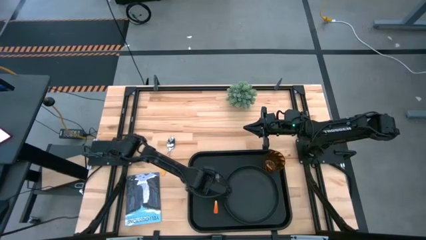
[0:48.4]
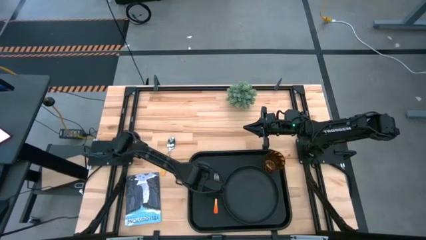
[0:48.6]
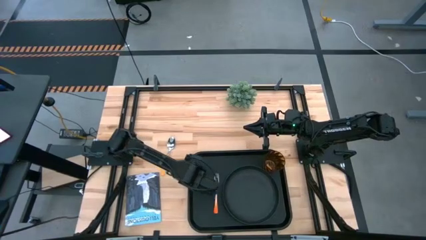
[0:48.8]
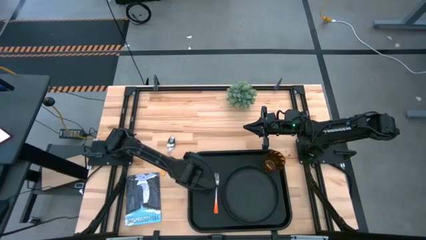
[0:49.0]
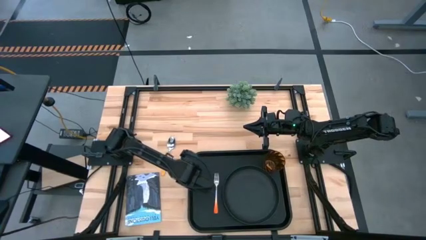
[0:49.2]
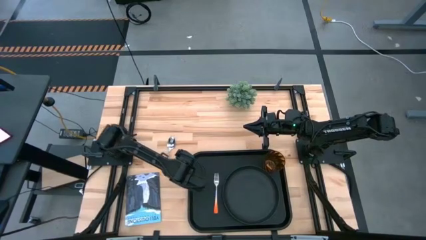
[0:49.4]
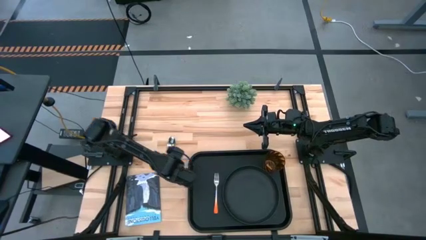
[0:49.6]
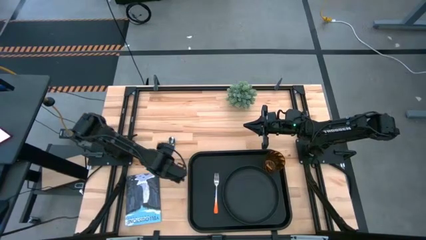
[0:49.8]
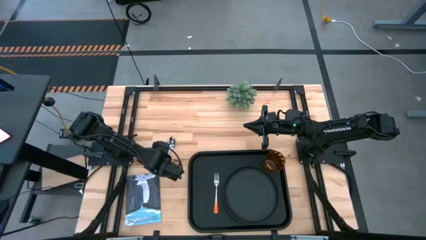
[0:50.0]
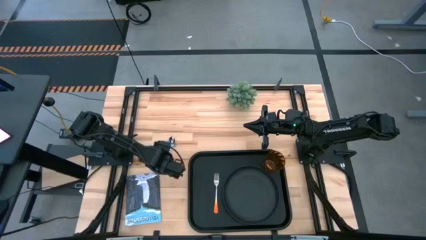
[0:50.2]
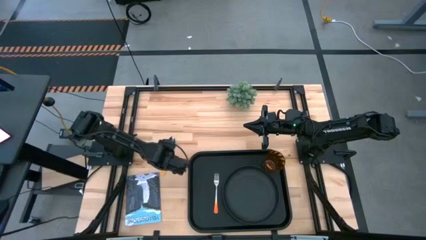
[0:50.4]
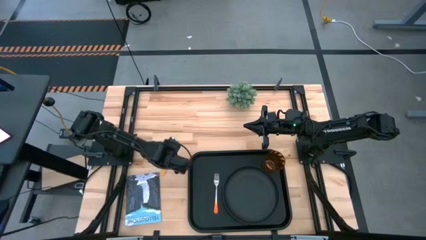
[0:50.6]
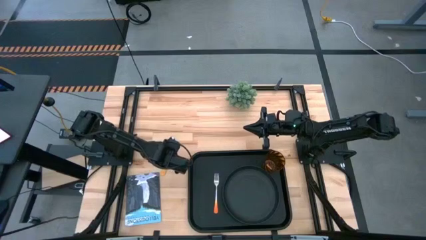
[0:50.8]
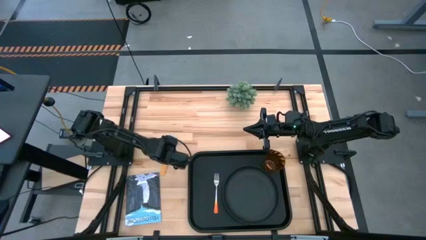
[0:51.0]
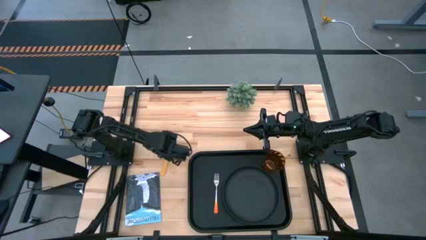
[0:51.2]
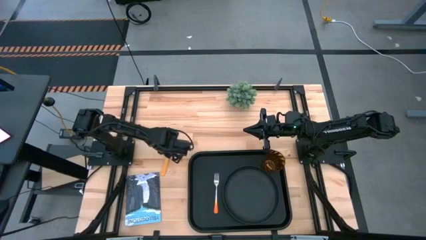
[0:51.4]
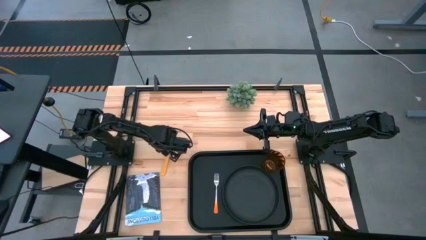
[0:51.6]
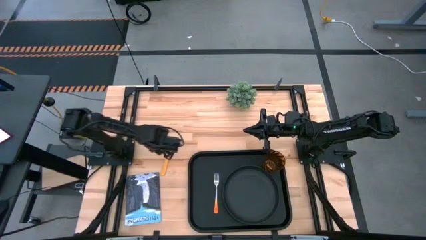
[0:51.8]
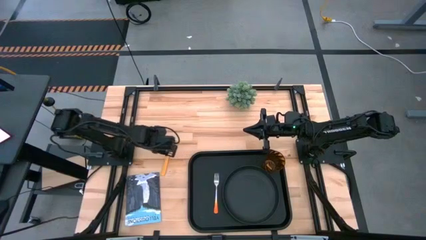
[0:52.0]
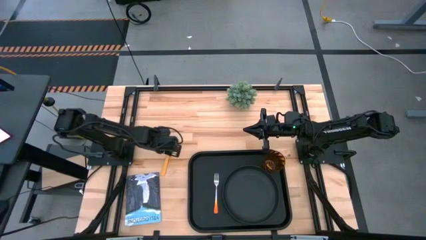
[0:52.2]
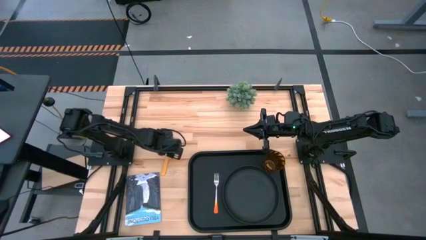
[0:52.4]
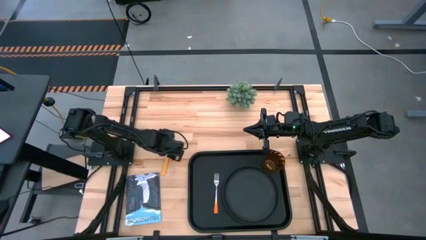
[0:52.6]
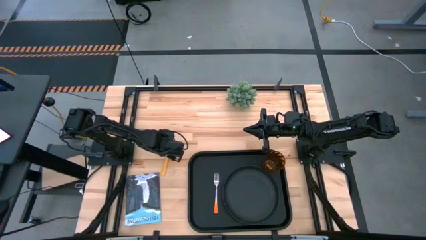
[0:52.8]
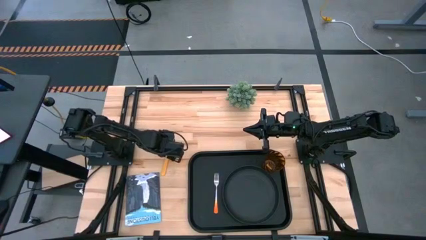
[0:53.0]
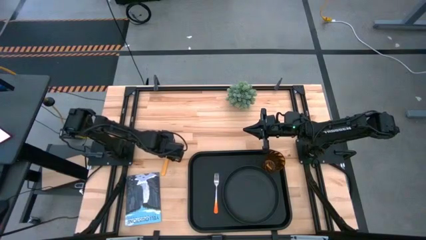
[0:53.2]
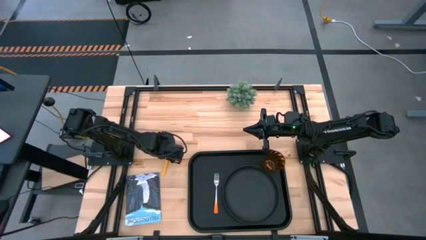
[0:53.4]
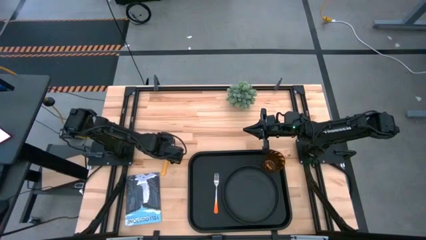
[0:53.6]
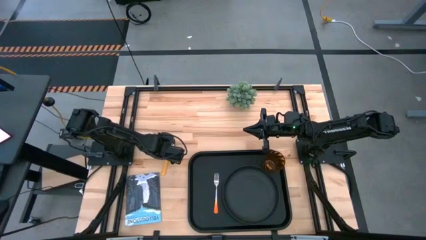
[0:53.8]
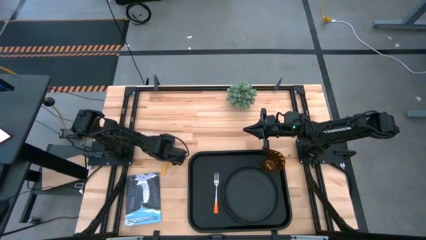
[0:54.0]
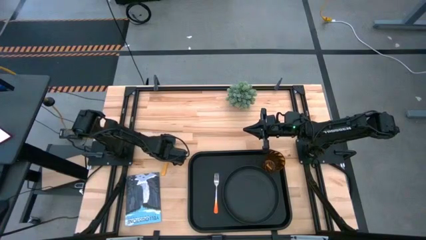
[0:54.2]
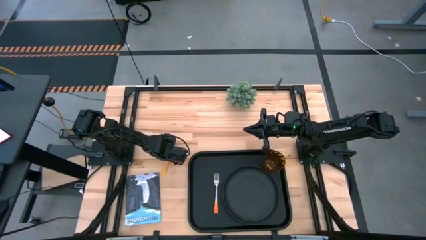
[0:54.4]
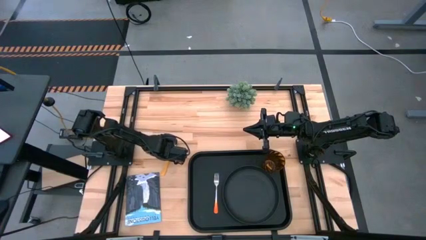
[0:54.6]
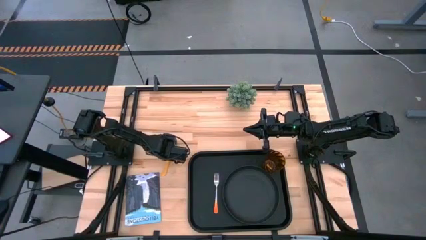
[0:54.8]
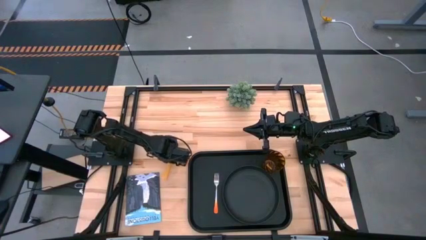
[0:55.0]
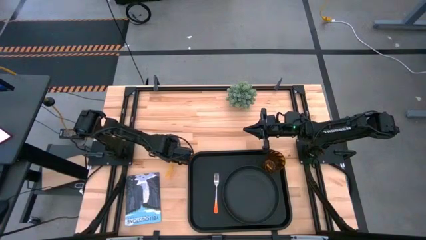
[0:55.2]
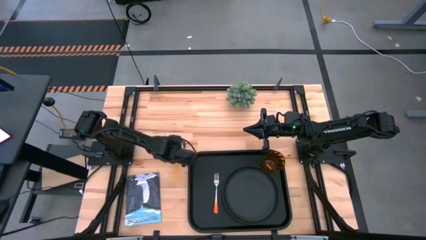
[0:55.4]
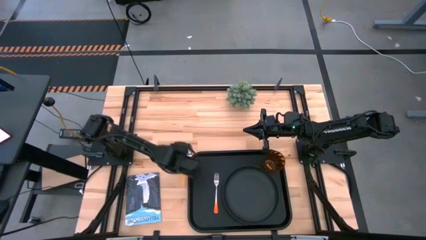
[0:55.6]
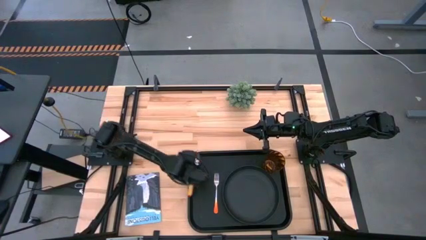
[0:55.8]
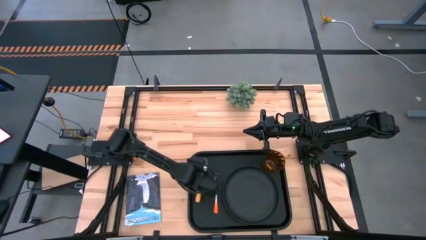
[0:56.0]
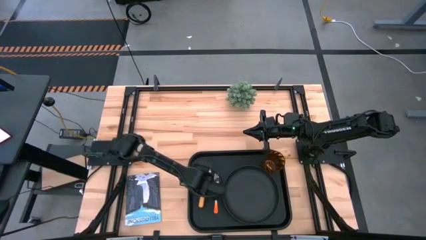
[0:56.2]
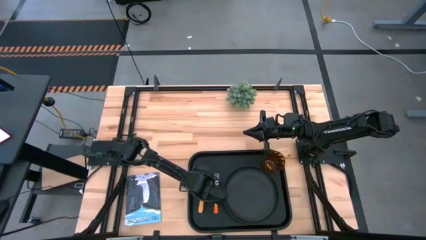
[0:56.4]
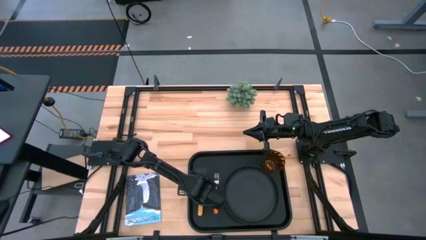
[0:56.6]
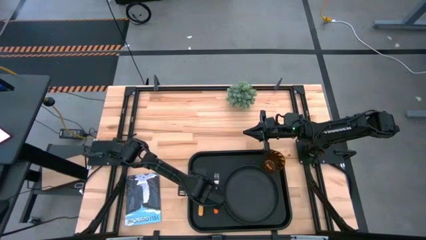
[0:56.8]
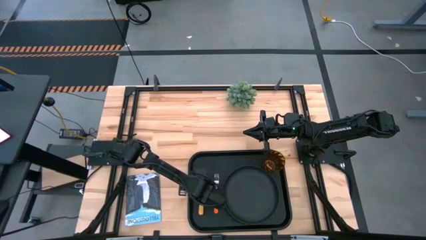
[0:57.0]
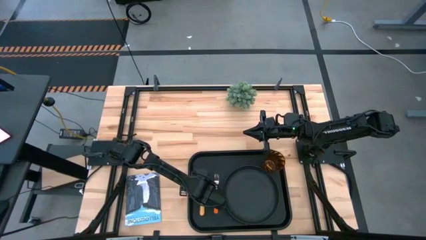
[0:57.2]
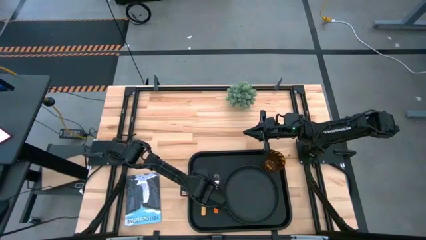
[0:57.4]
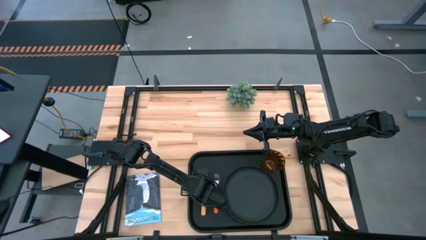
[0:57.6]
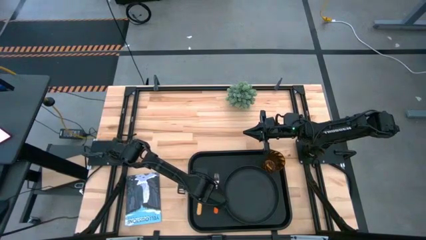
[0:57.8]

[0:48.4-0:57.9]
Task: Pick and place plate/cup/fork/spoon on tray
Put the yellow spoon on the black tray to the left side of the orange spoon

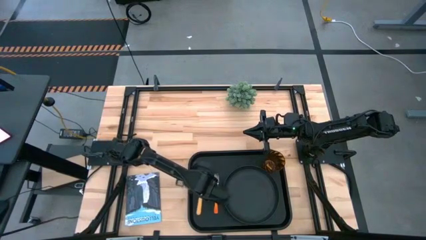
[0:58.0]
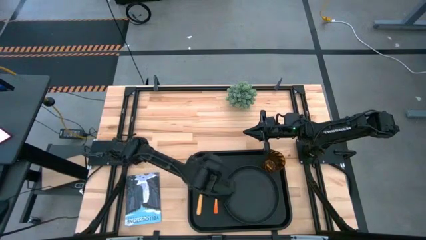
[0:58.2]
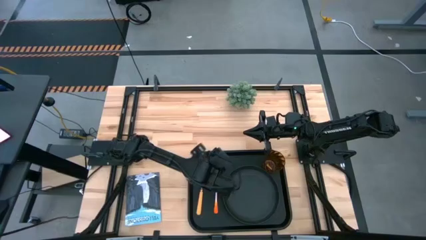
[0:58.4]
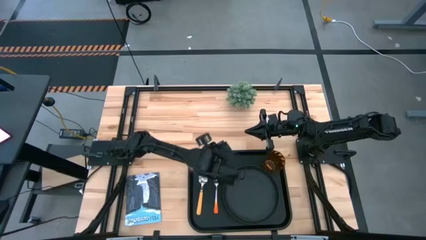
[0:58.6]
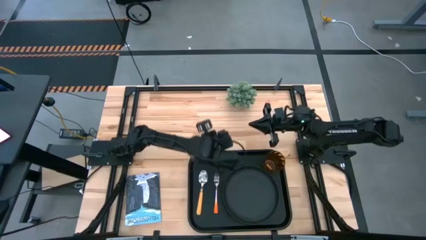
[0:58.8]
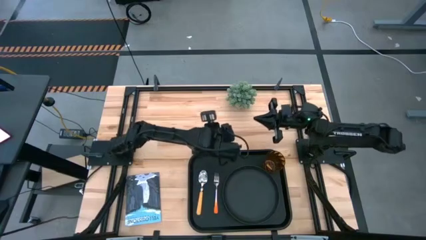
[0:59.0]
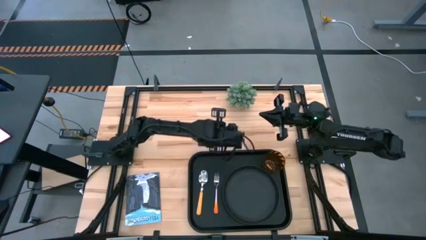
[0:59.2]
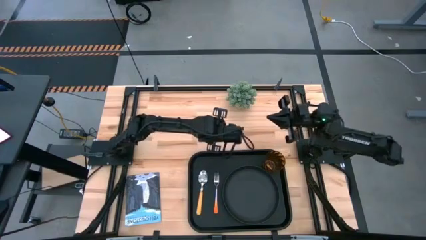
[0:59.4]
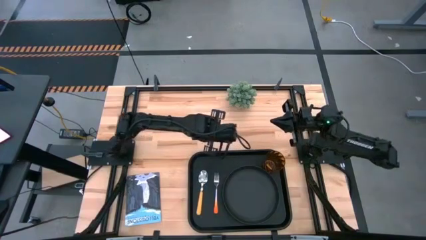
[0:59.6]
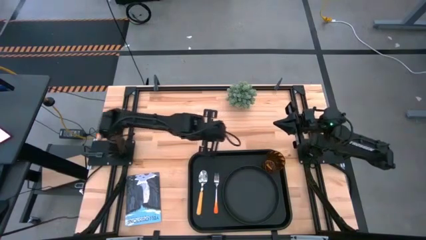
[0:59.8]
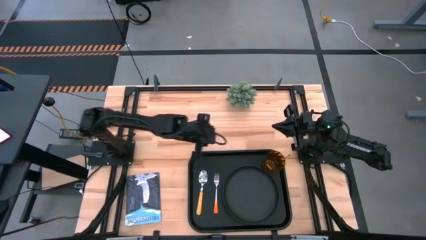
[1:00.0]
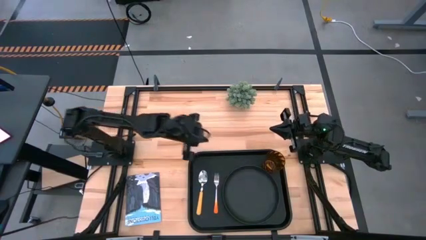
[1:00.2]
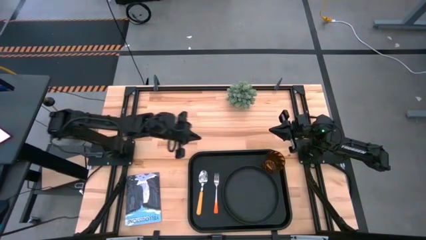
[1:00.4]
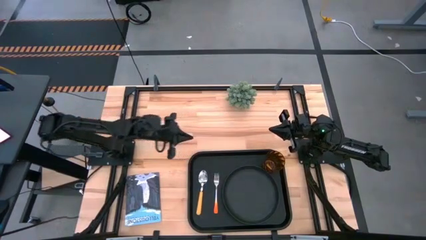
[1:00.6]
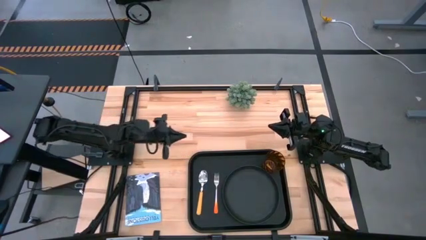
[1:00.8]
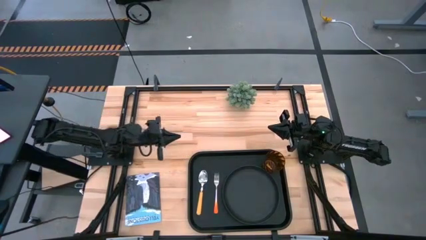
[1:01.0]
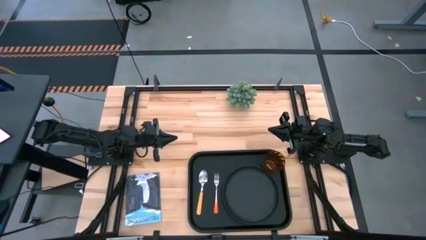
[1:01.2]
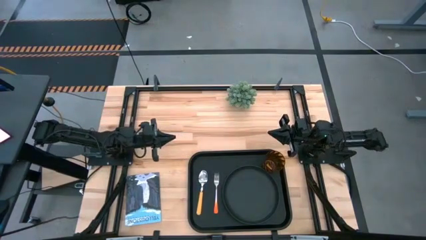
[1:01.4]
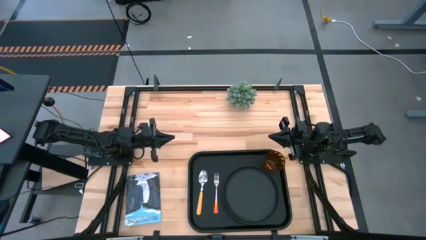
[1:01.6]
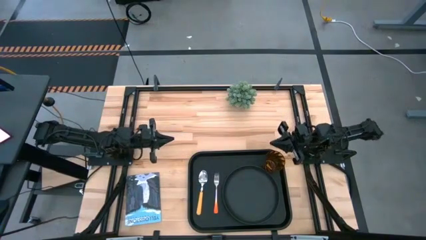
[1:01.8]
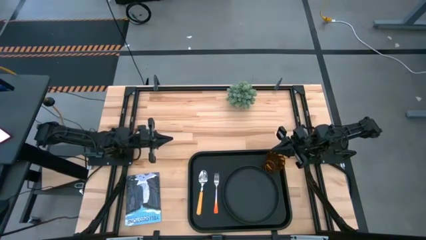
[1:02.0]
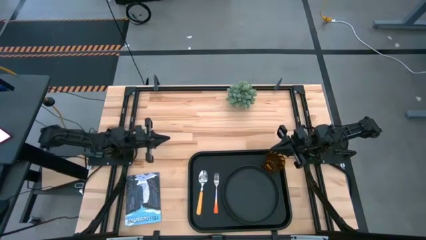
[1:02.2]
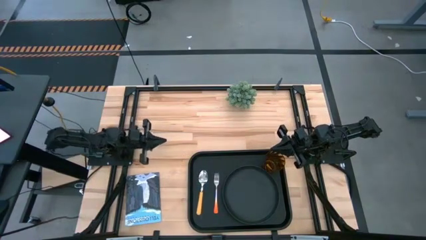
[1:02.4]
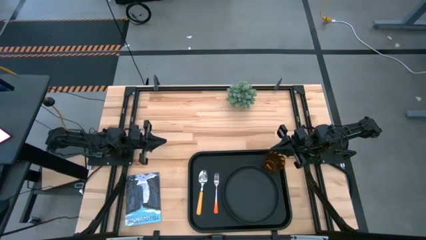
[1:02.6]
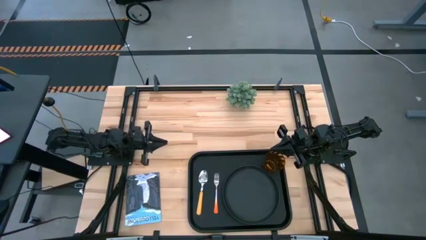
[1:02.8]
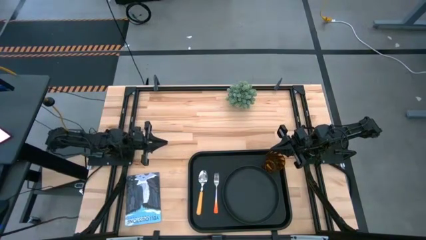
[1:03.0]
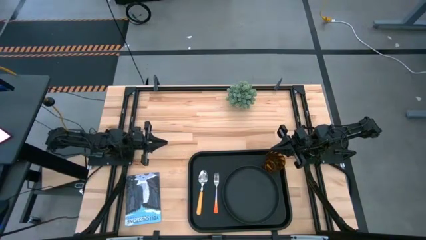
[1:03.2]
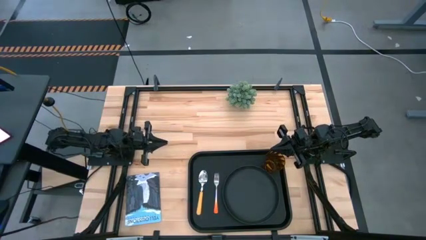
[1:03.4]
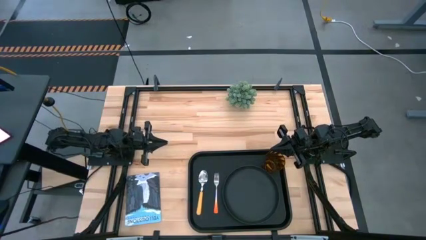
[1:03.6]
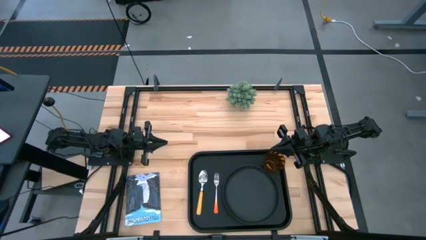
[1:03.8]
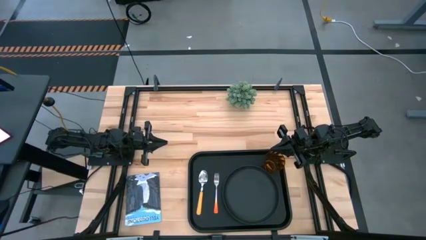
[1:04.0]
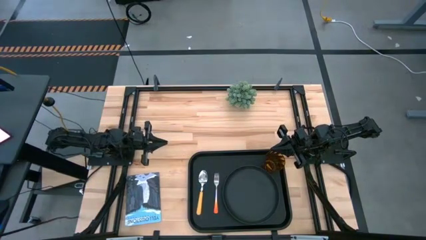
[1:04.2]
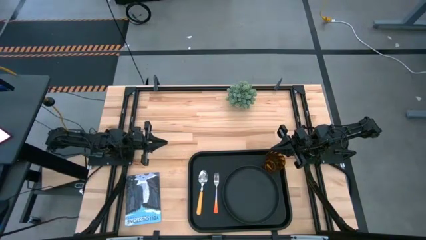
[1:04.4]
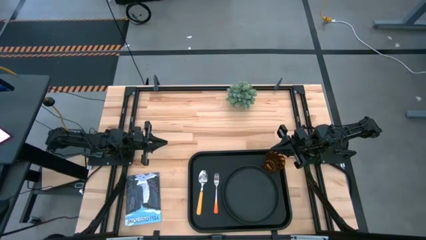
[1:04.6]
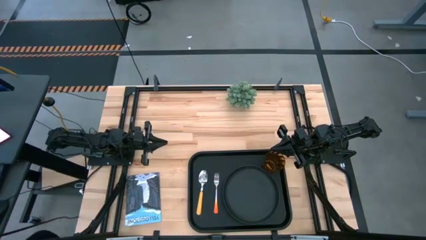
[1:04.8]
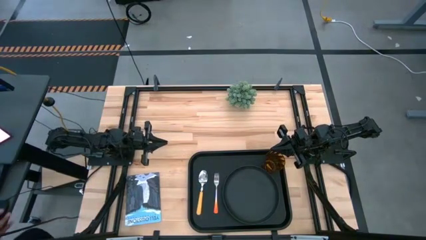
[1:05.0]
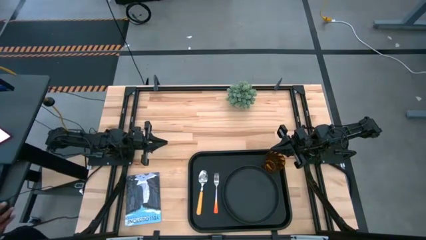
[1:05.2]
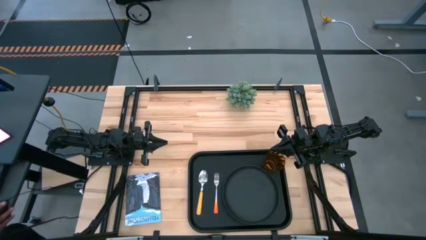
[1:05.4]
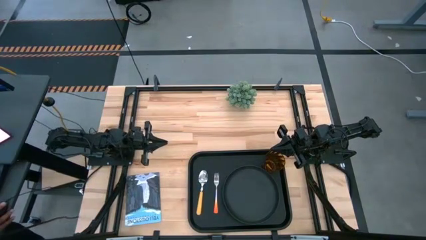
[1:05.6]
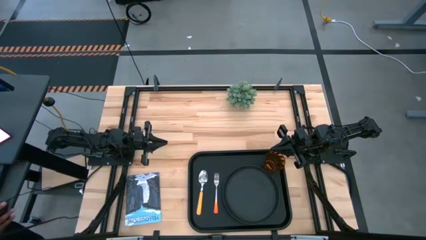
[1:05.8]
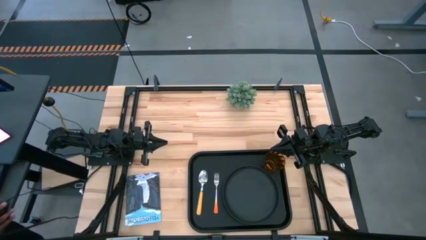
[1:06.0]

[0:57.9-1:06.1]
Return to Home Position
